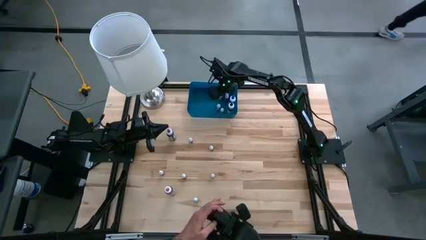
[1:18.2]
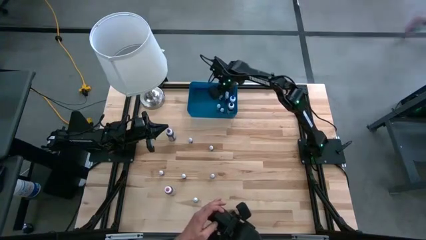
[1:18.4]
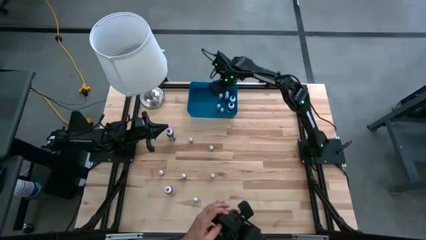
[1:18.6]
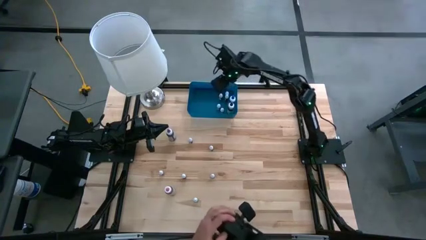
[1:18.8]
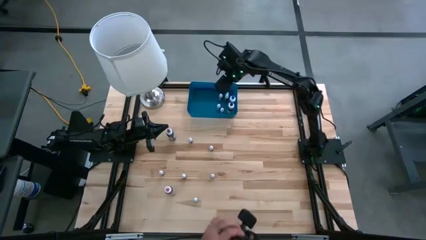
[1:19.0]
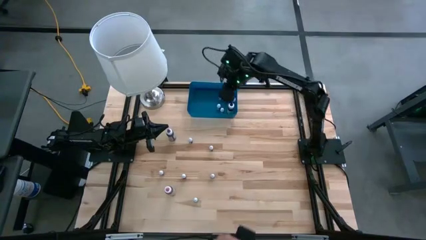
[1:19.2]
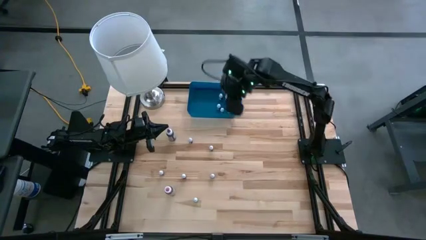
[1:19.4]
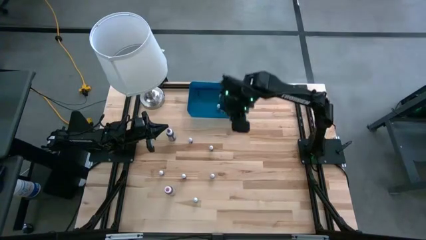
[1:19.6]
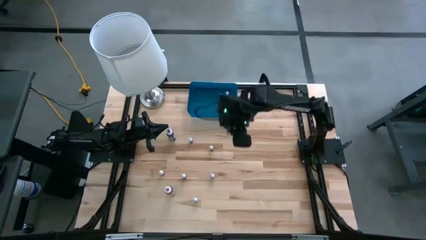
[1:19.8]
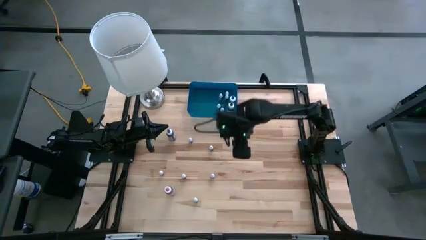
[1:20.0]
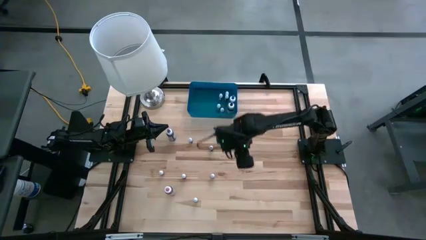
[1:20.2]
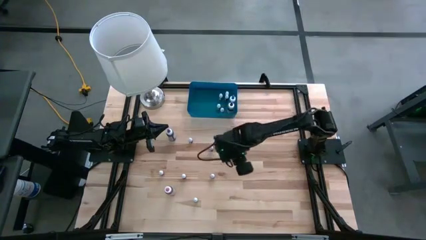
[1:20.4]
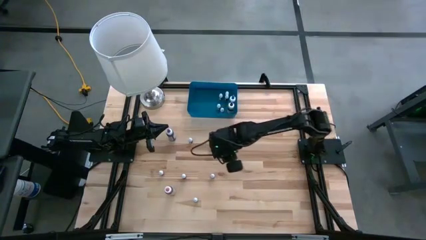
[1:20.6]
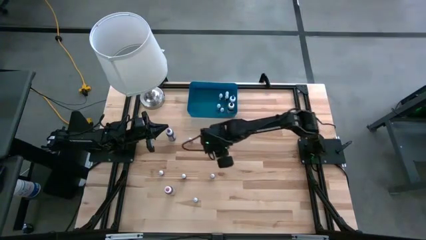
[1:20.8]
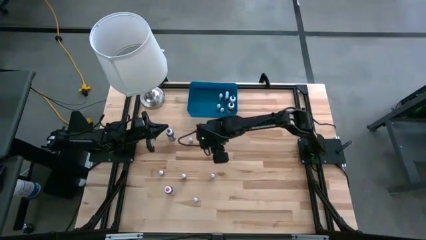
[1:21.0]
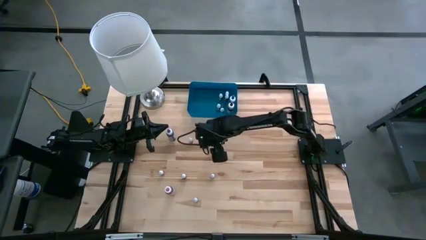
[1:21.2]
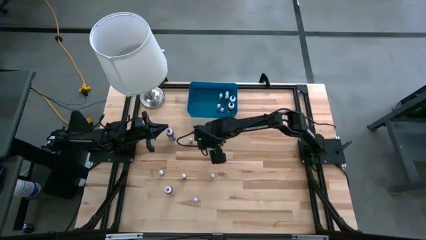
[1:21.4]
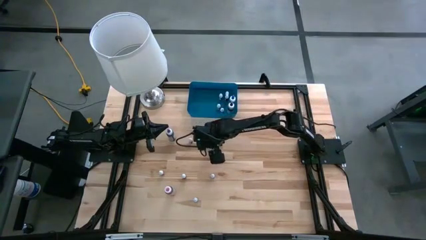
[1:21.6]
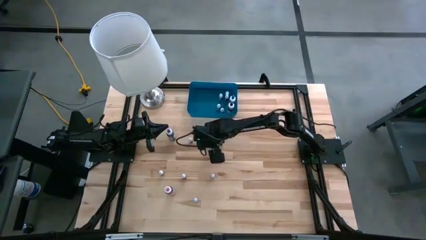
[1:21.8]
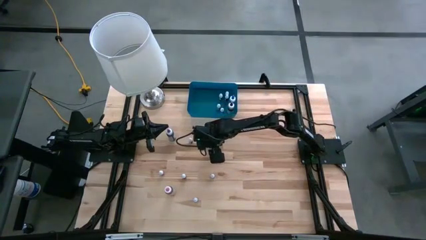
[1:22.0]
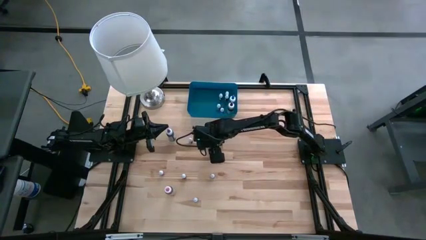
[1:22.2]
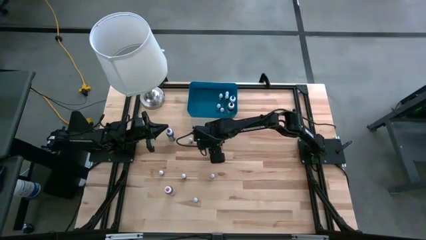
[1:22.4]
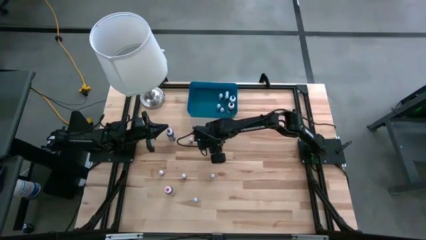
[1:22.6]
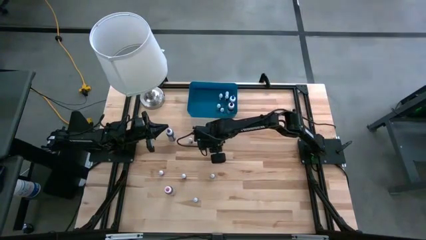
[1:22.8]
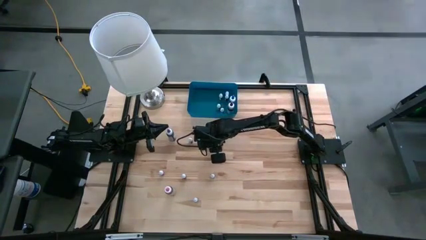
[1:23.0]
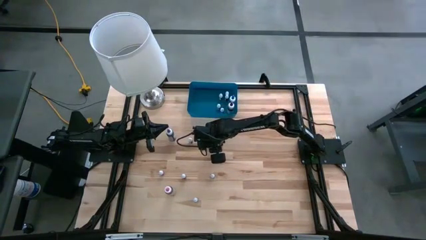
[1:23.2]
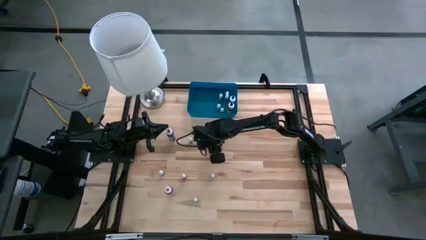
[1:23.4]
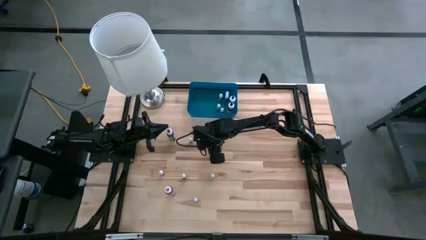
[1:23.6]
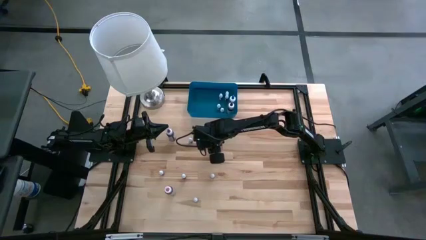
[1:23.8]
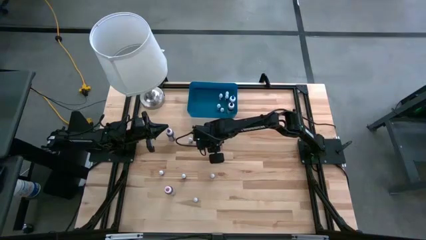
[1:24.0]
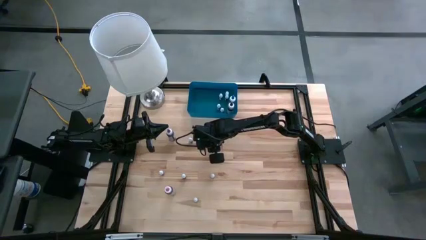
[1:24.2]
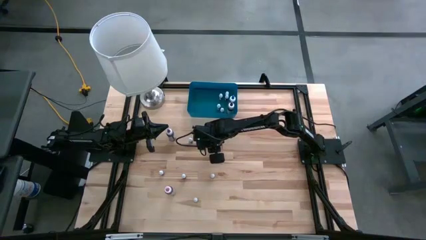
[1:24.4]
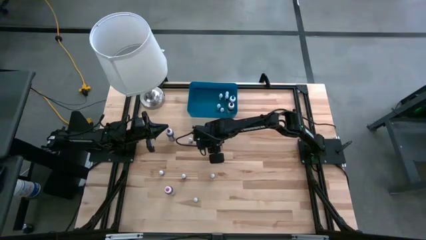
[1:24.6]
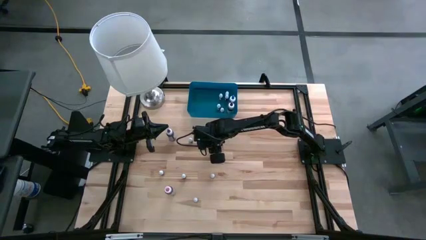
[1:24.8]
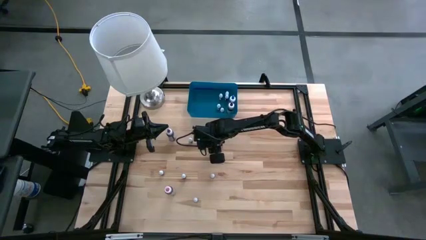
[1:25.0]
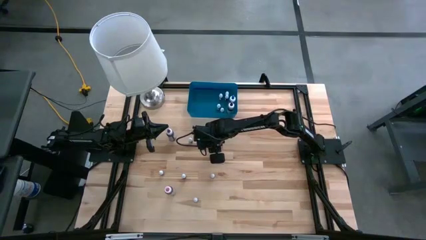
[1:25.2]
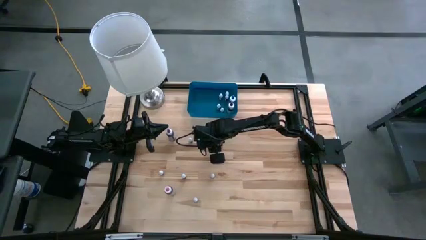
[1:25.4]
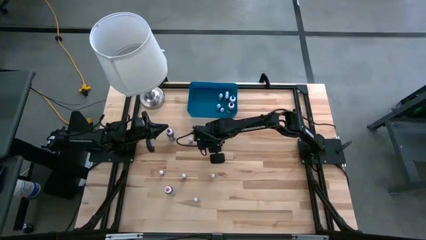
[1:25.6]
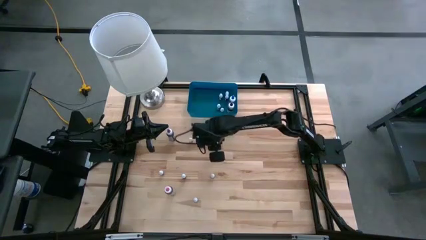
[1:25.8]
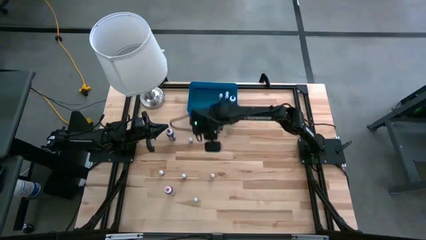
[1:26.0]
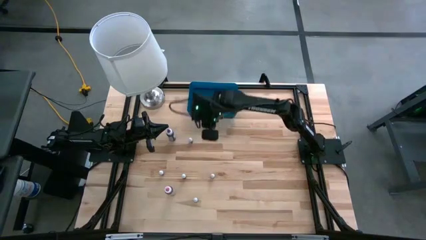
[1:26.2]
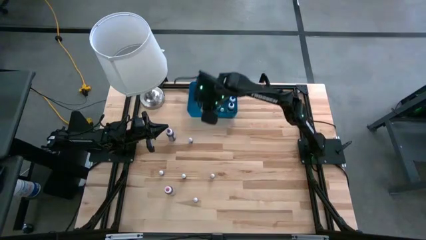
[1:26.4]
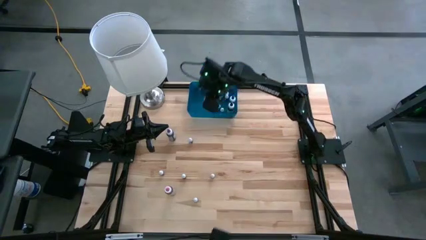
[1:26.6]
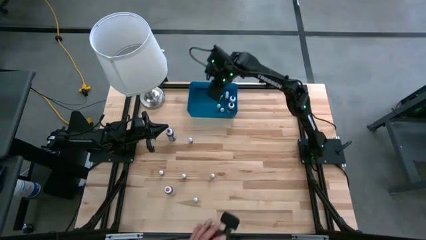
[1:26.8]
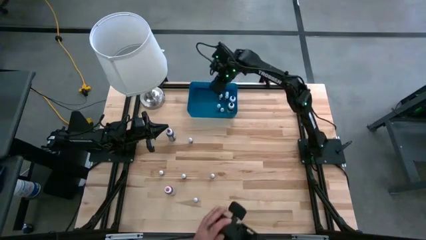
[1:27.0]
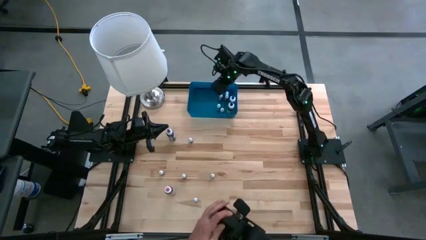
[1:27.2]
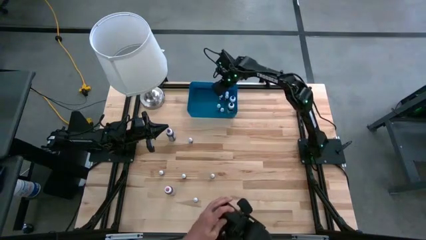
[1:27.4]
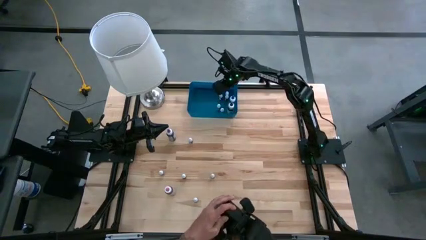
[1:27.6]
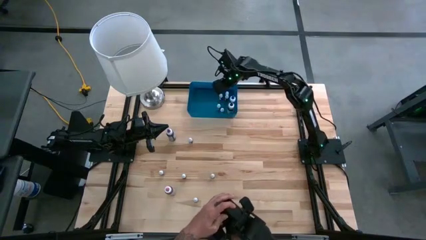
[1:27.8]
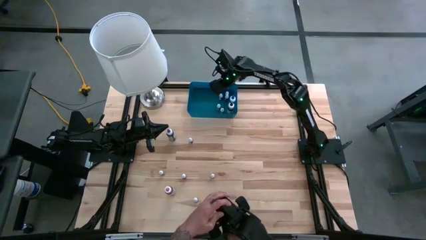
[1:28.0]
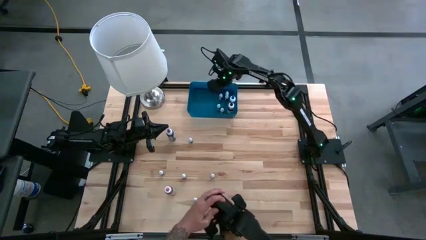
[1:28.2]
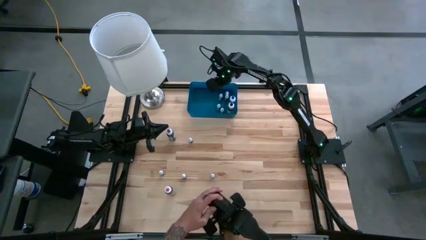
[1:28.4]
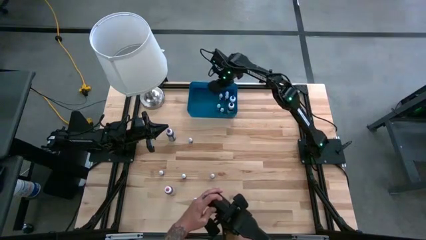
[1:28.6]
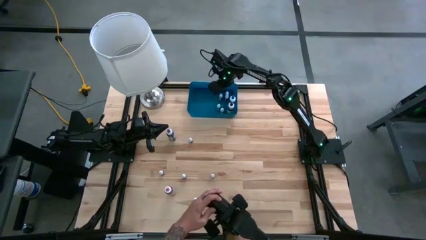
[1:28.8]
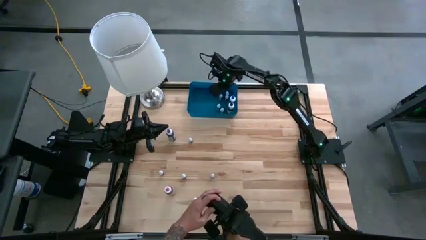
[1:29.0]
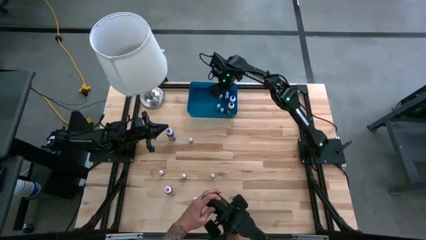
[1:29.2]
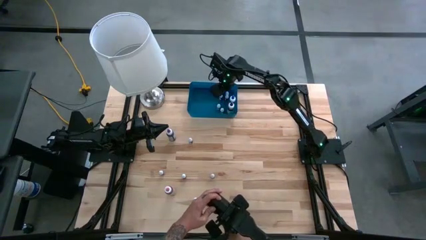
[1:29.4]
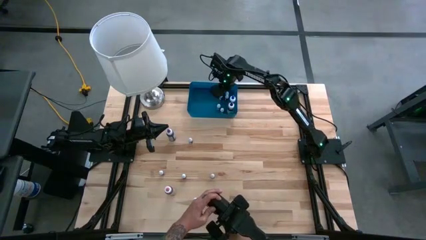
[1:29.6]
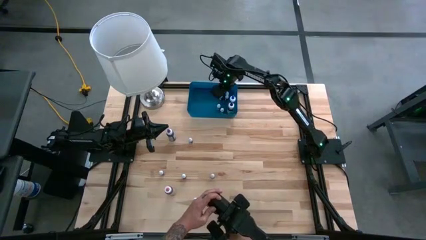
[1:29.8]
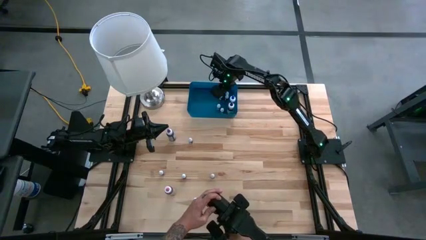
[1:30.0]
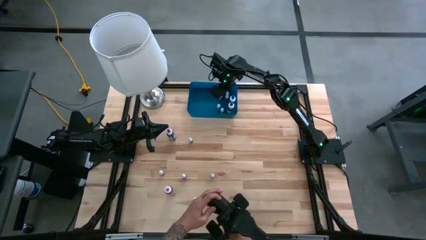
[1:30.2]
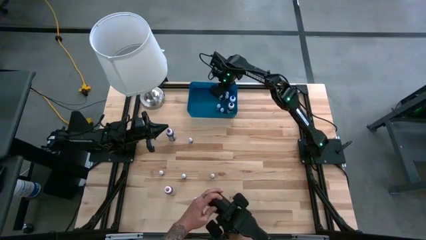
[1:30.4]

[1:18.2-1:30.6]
Task: Pick & Place food coloring
Put the small red food coloring bottle into the blue bin

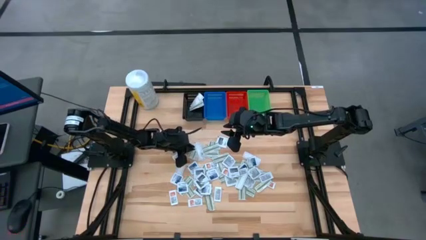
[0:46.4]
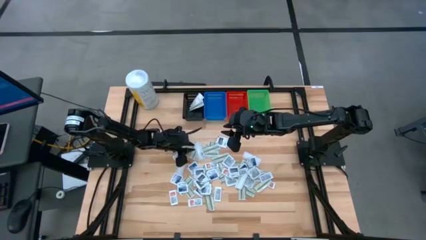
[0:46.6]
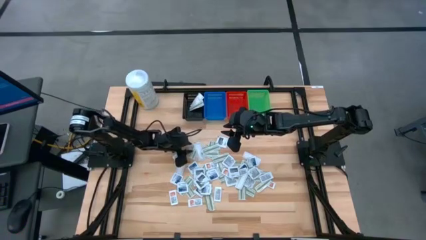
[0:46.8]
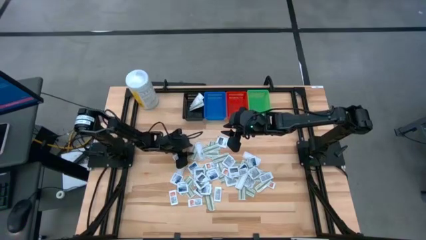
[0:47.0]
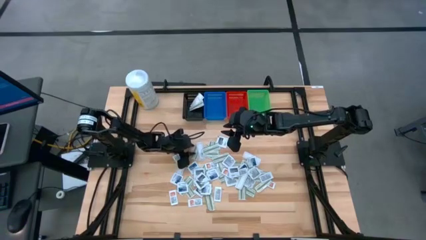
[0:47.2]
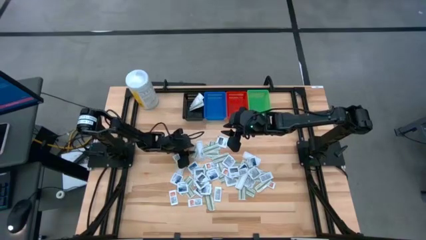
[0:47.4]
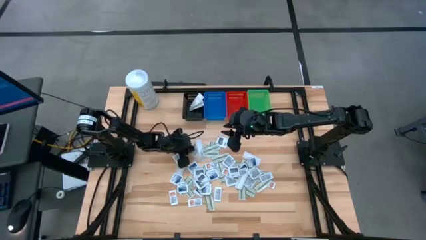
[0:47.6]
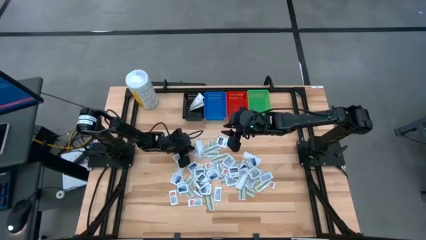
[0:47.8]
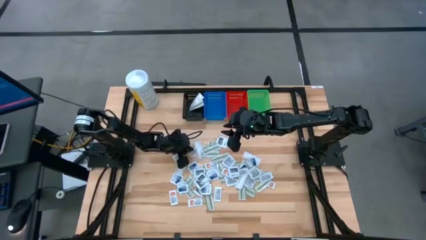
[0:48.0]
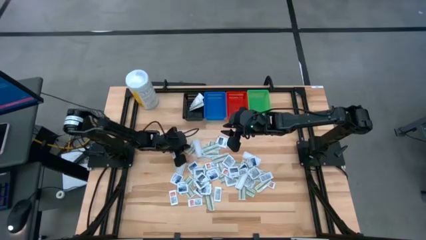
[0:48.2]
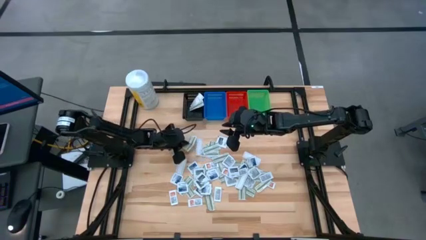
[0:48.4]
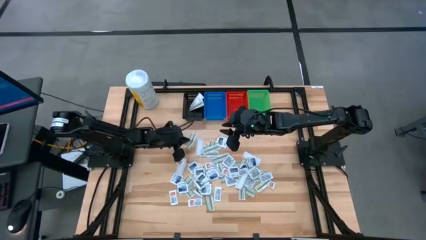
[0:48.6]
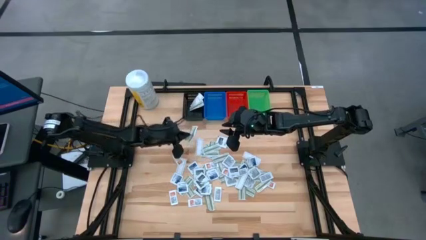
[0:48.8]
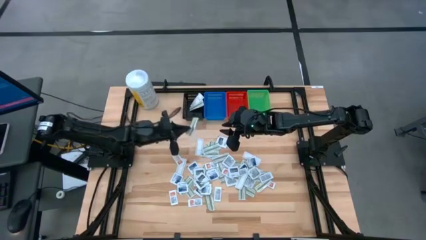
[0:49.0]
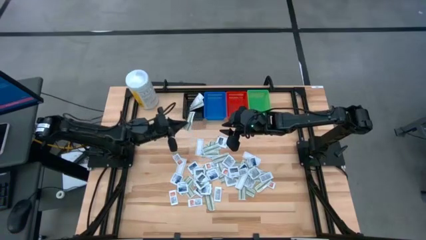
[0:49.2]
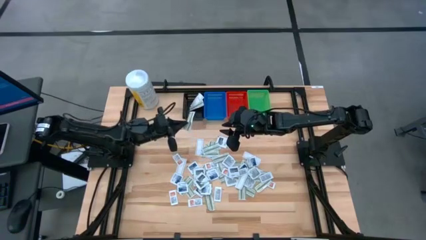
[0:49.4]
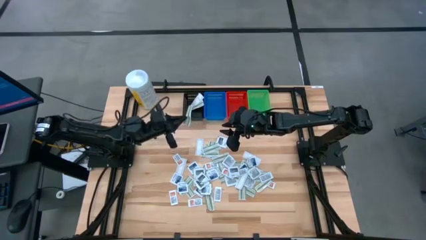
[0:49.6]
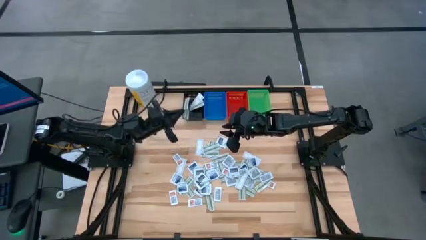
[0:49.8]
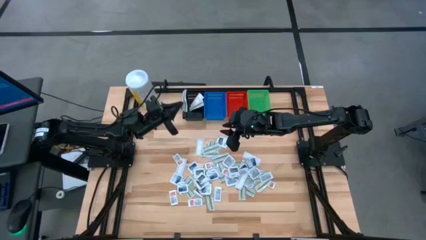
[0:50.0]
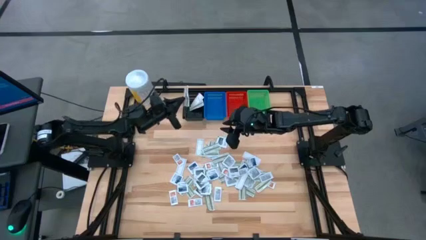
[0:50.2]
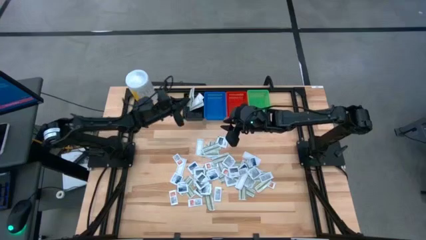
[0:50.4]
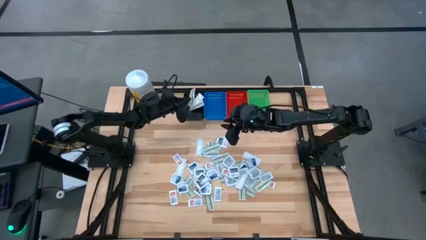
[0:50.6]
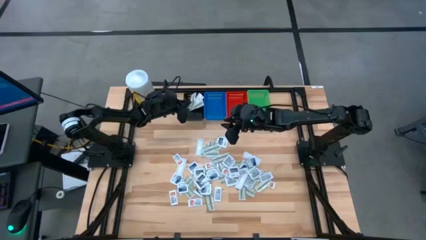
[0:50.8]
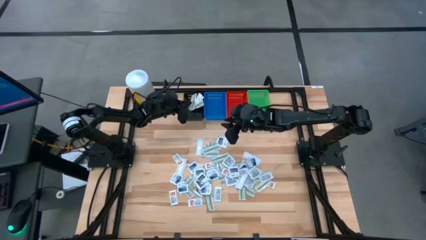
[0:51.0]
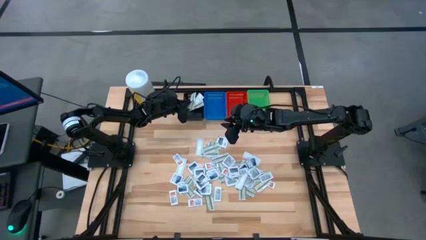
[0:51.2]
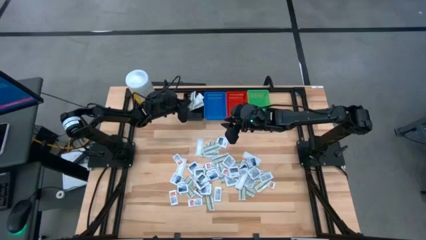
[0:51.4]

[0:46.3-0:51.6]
Task: Pick & Place First Aid Supplies
Put the green bandage pack in the black bin
